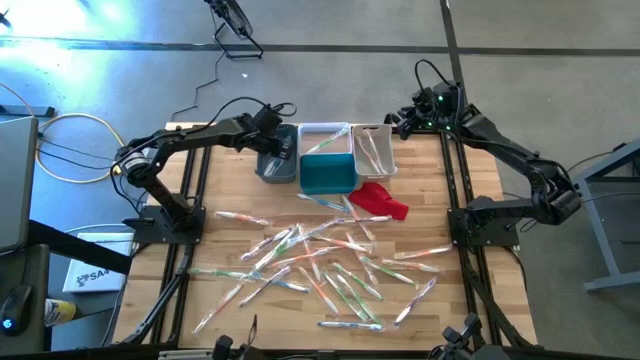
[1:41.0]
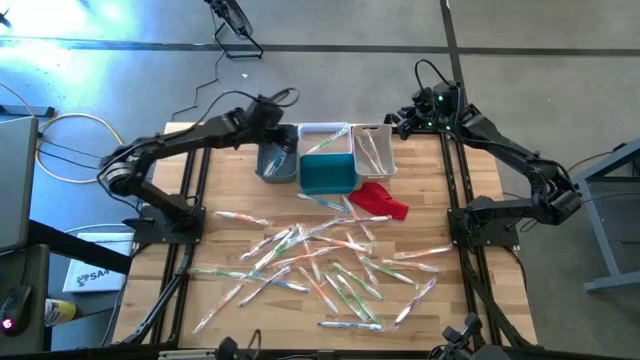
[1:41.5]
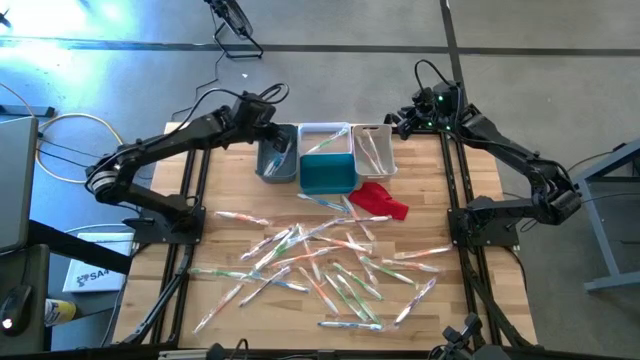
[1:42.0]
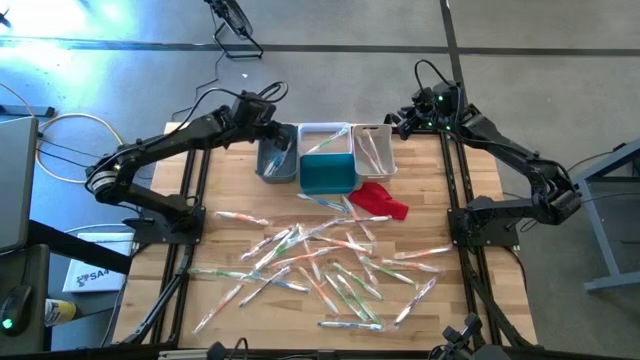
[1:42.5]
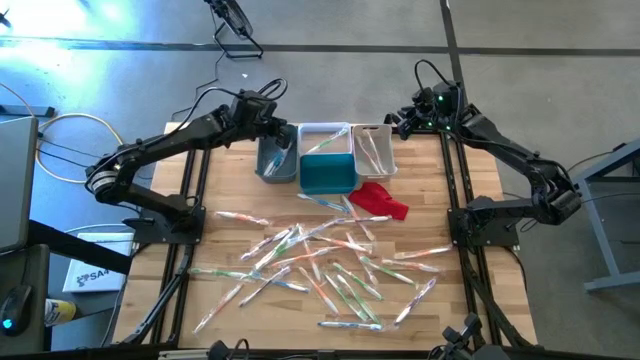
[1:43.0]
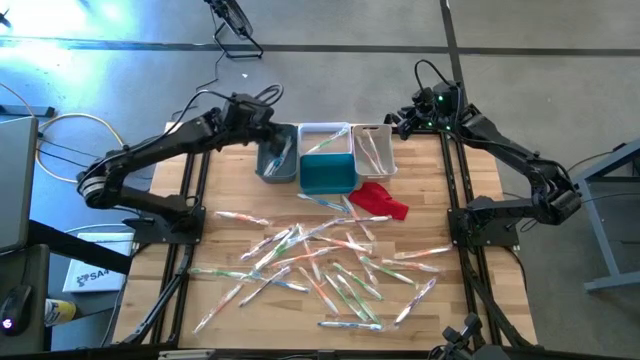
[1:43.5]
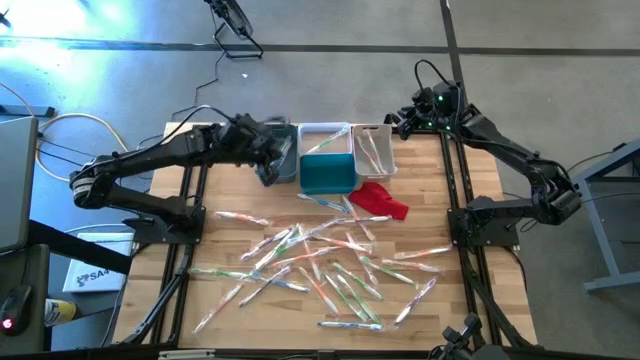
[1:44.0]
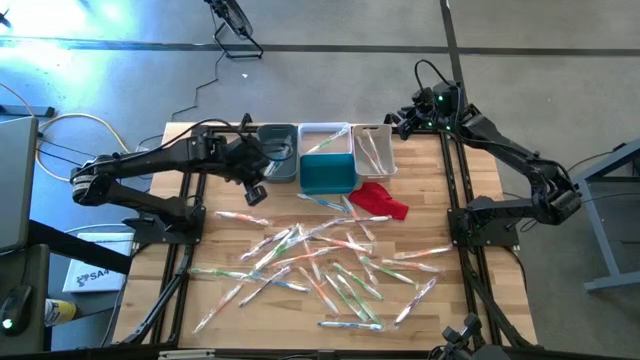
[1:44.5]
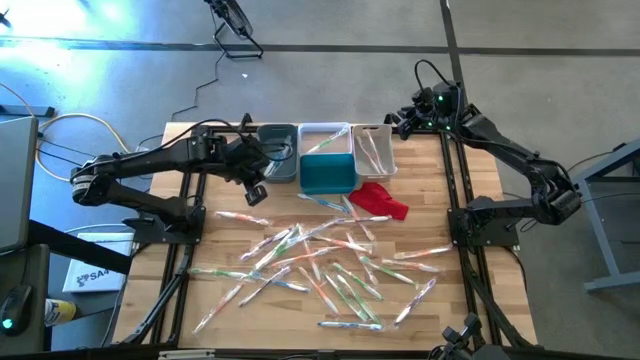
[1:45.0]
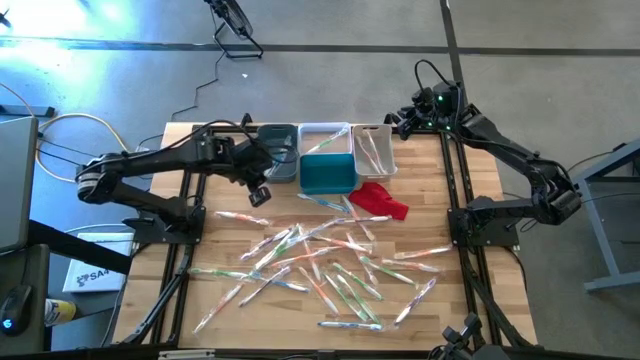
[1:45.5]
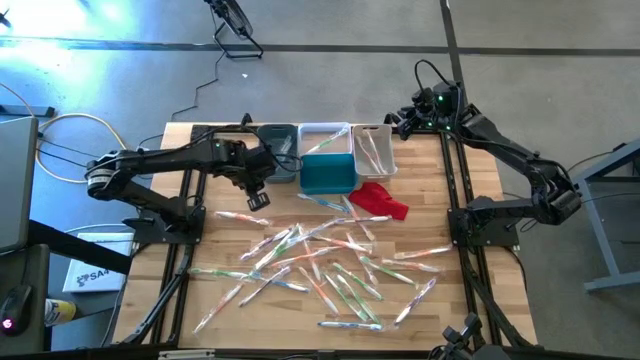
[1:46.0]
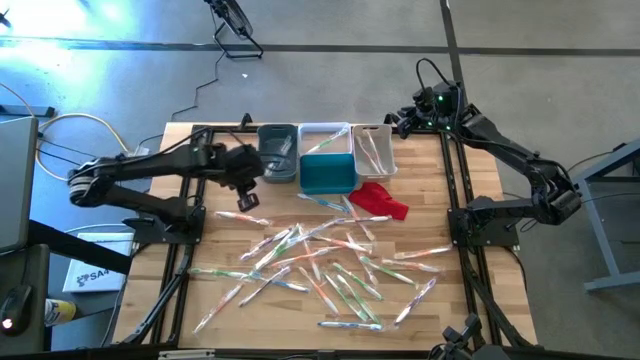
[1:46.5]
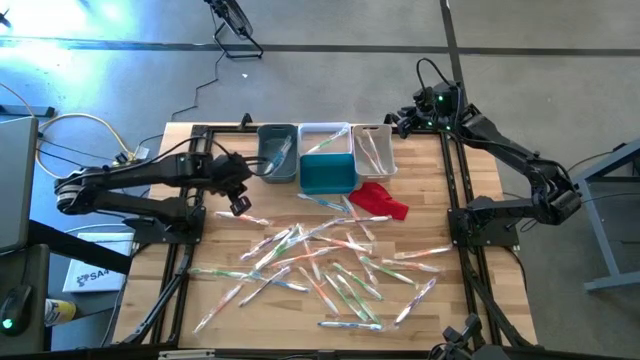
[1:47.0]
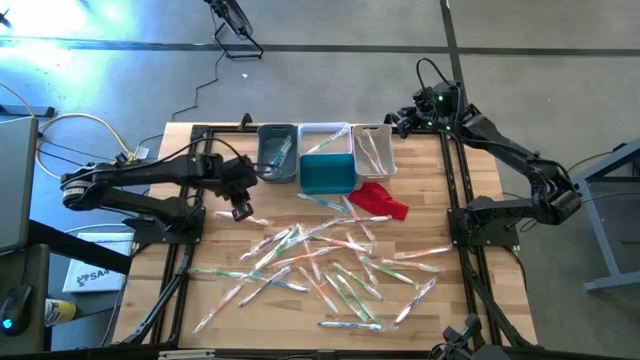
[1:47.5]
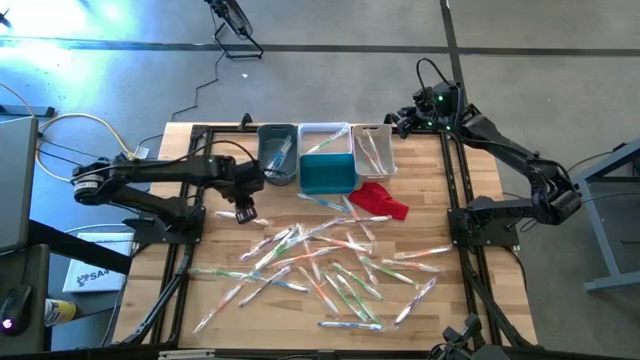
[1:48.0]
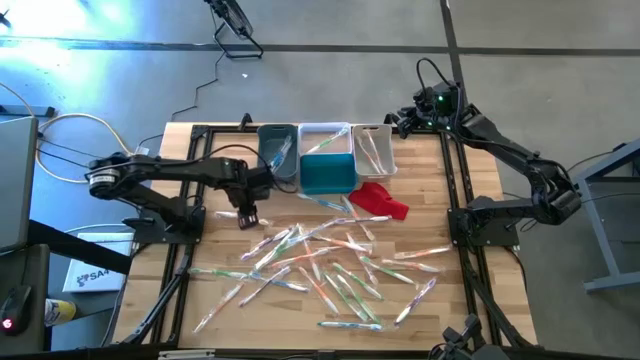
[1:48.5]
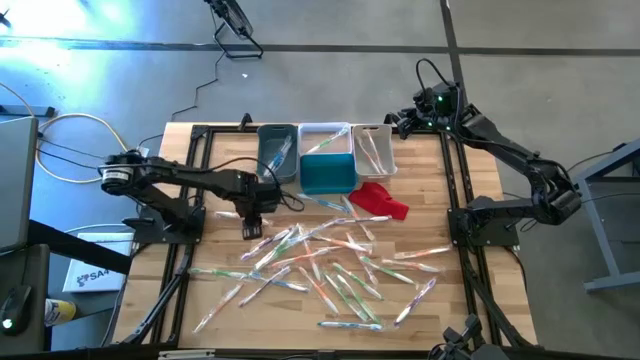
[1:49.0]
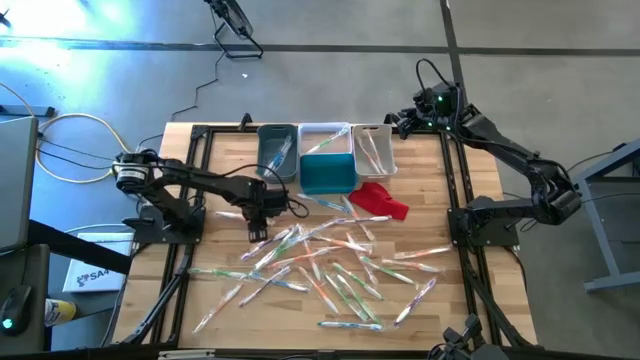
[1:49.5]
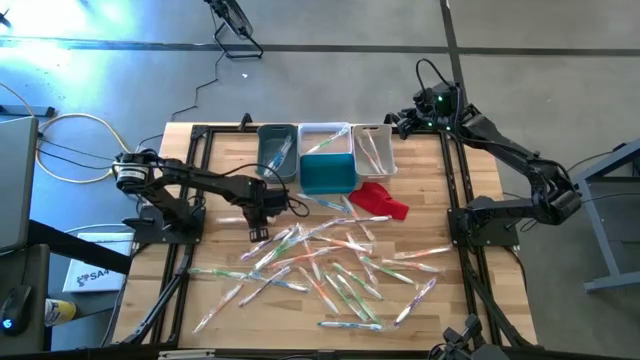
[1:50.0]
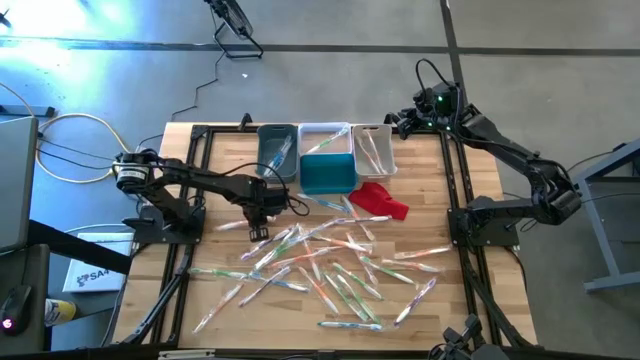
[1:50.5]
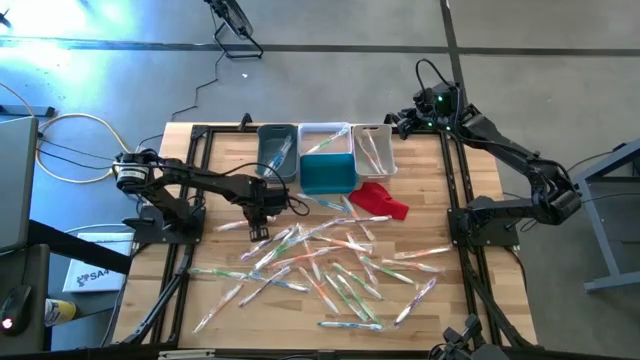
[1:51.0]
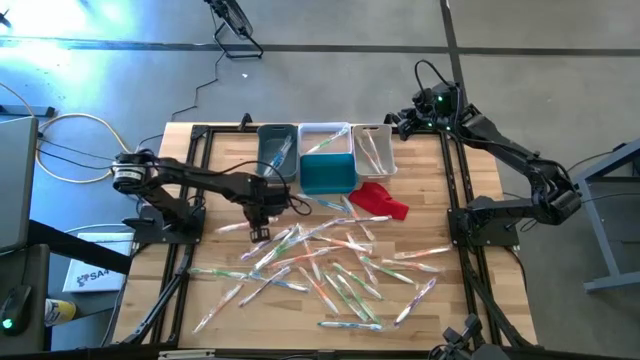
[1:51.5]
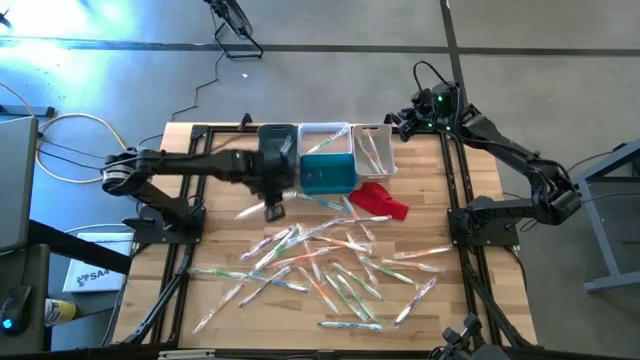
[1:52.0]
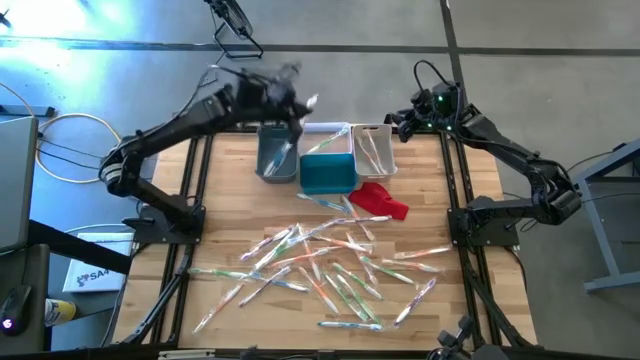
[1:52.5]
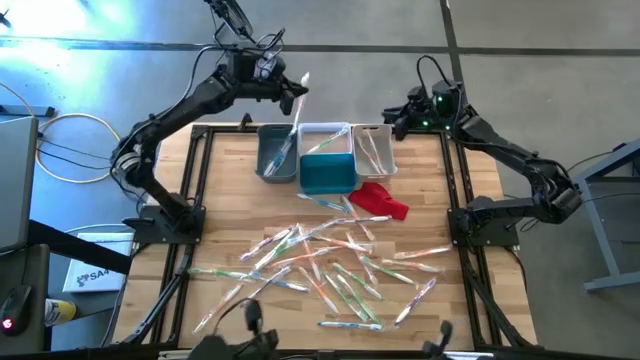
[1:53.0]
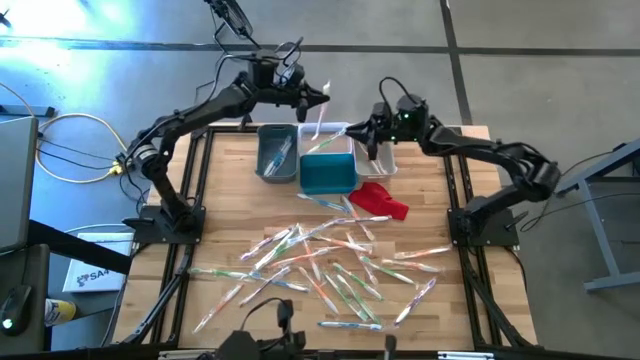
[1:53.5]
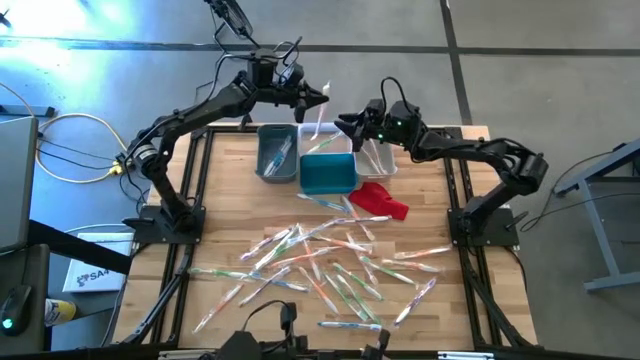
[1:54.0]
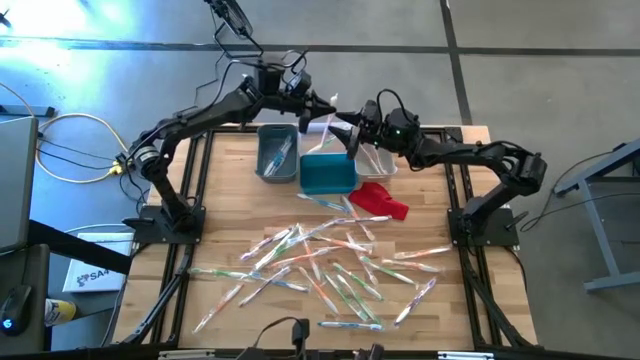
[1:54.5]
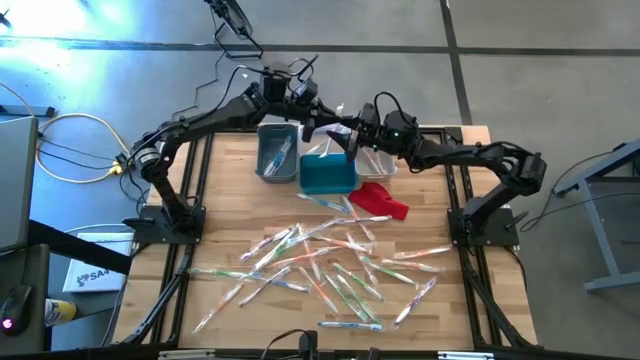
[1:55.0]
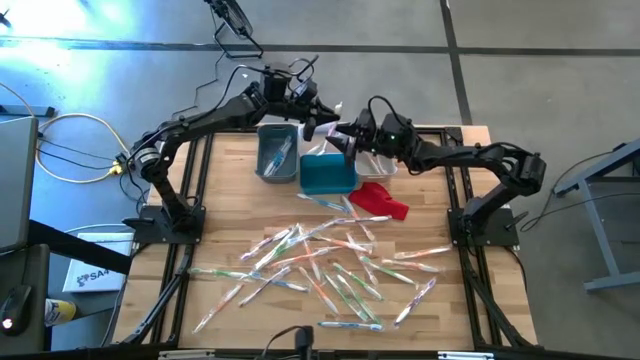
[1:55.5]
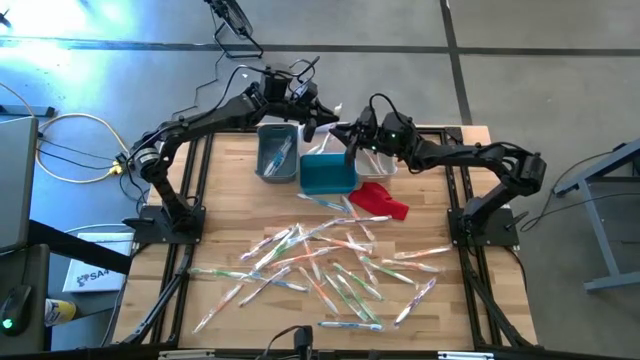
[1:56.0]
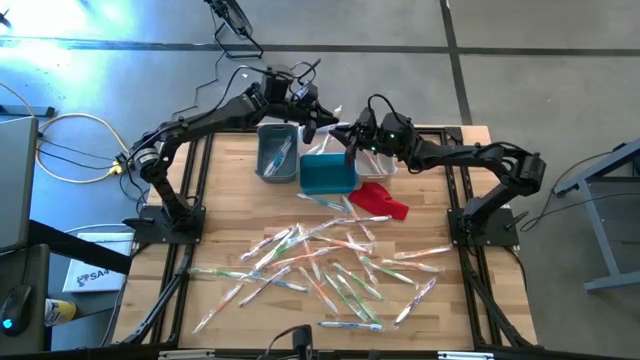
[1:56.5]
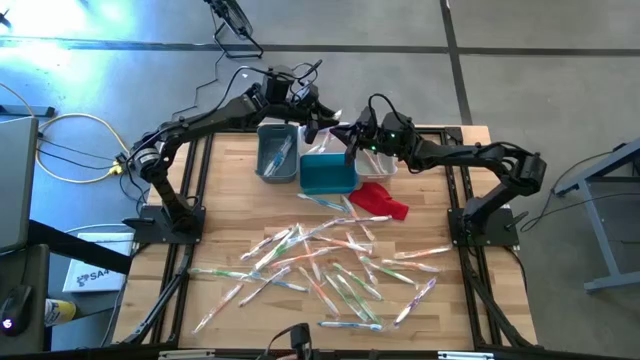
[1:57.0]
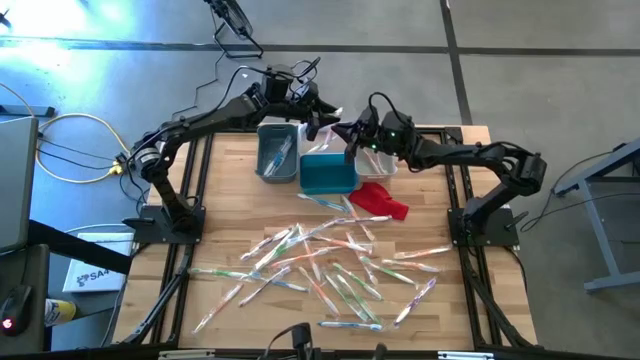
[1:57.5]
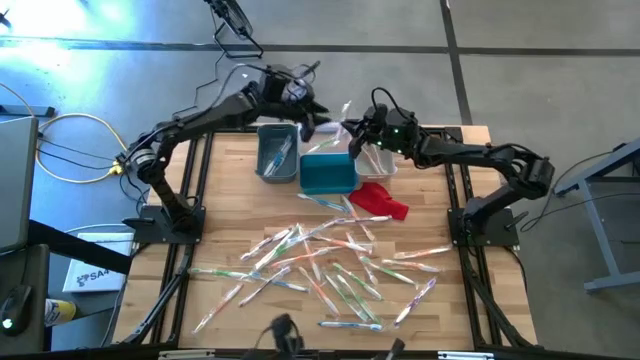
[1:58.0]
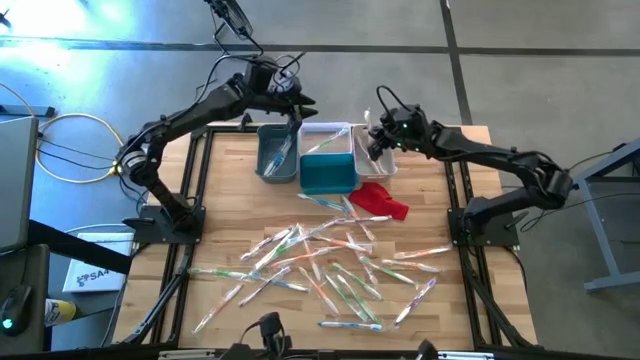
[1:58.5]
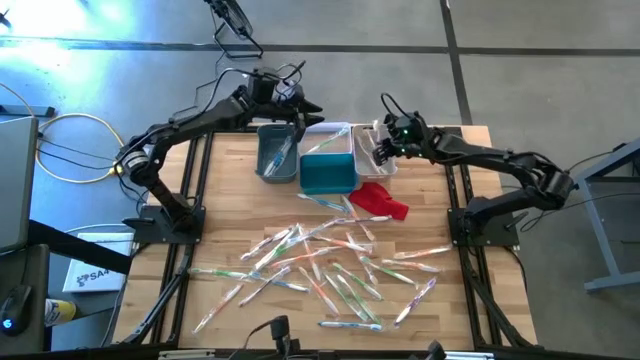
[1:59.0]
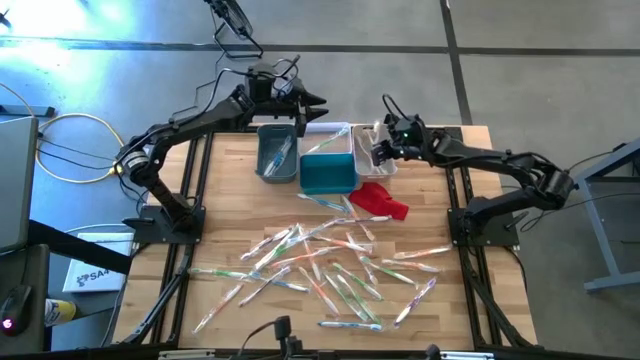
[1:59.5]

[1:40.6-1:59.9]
Task: Pick & Place Toothbrushes
Put the orange toothbrush into the white bin

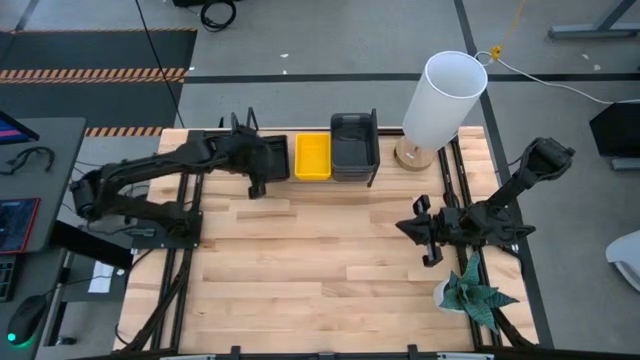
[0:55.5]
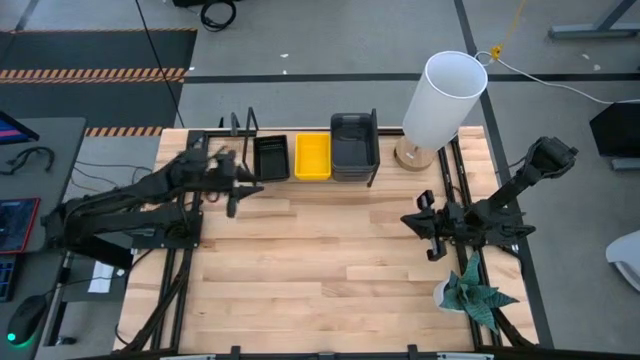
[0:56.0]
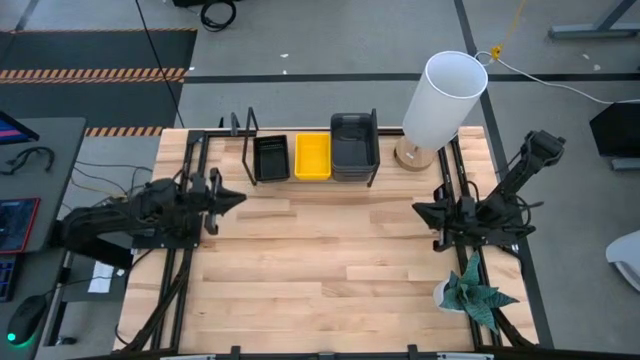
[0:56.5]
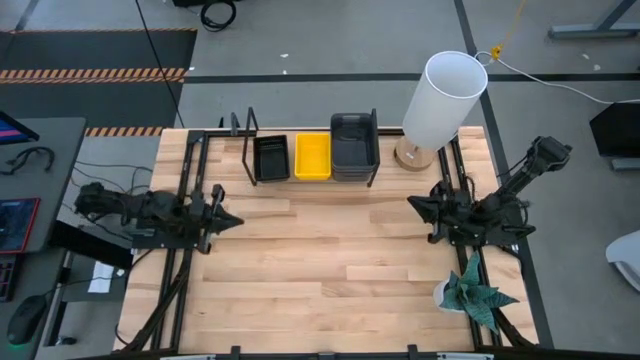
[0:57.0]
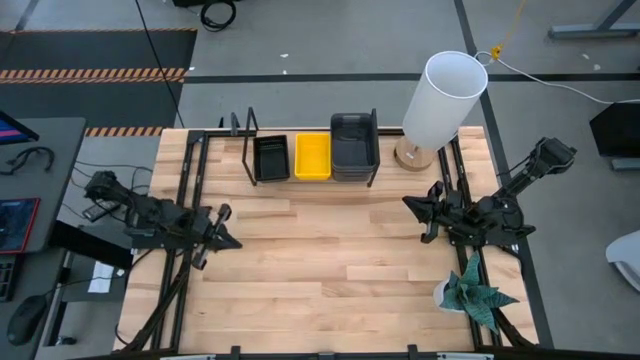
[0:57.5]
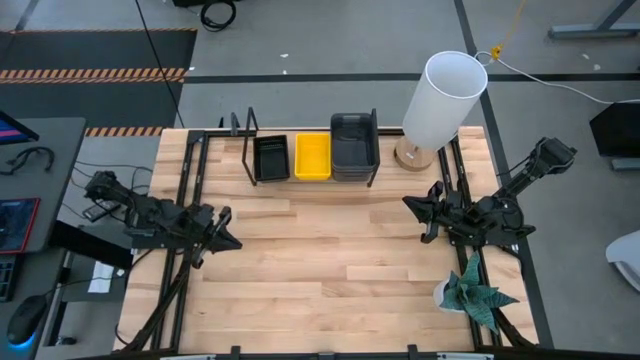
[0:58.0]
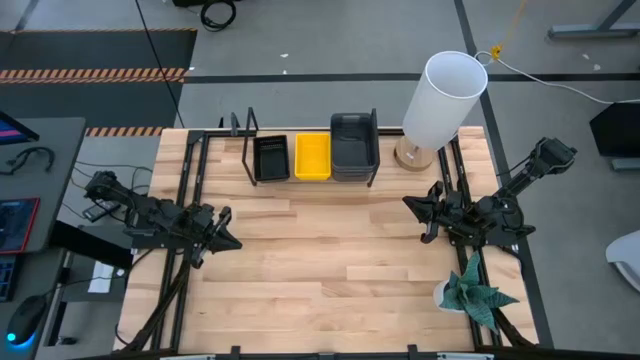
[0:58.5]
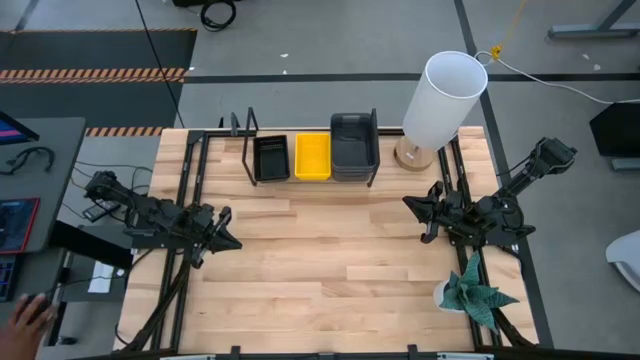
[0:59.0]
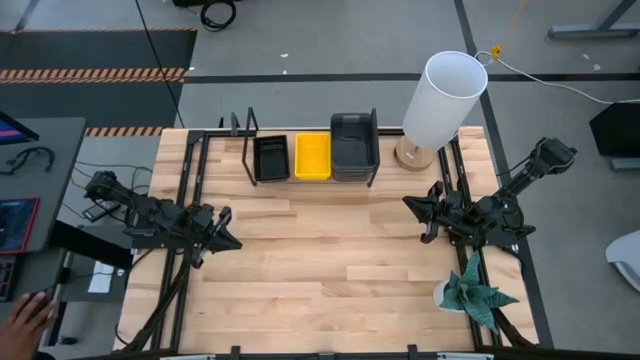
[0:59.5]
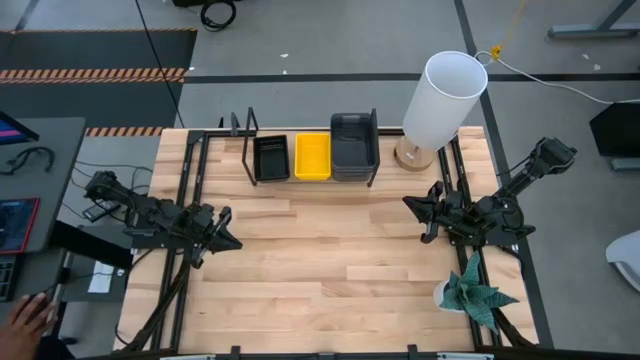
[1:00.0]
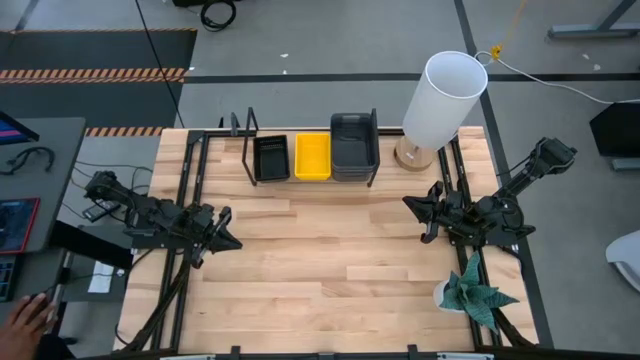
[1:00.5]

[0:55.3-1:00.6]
Task: Stack baskets on shelf by color
Return to Home Position
